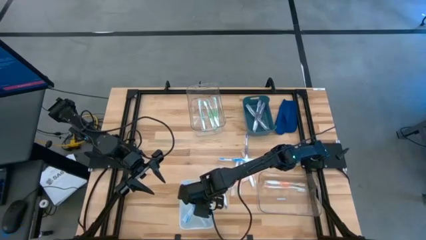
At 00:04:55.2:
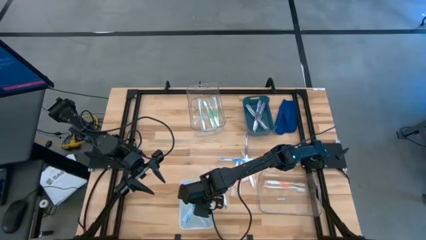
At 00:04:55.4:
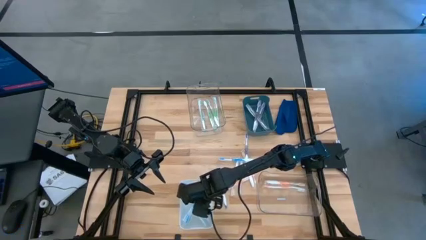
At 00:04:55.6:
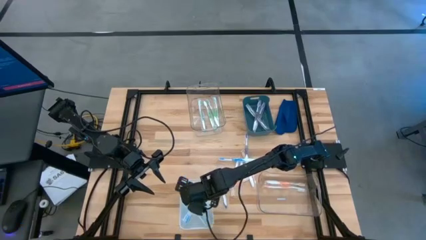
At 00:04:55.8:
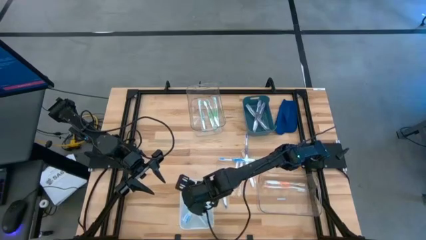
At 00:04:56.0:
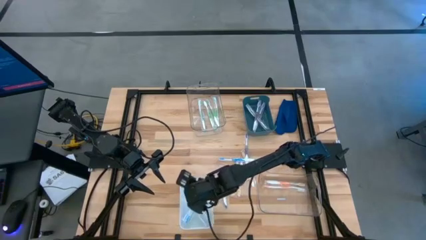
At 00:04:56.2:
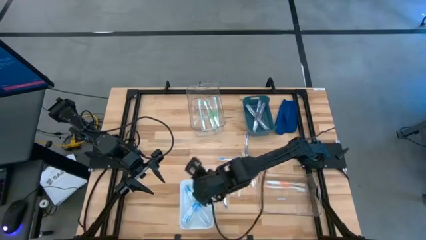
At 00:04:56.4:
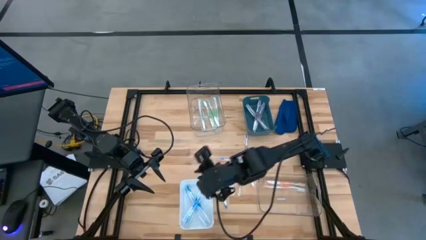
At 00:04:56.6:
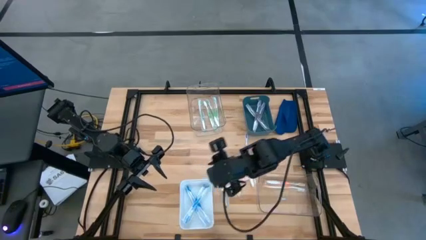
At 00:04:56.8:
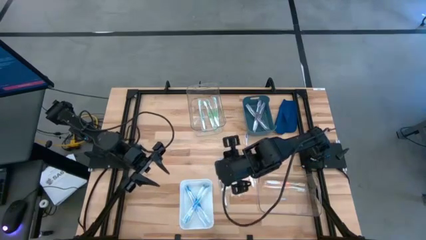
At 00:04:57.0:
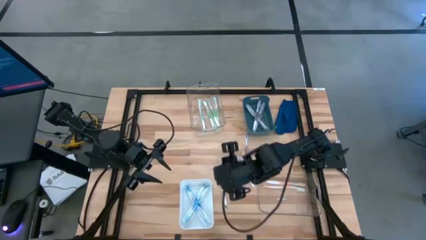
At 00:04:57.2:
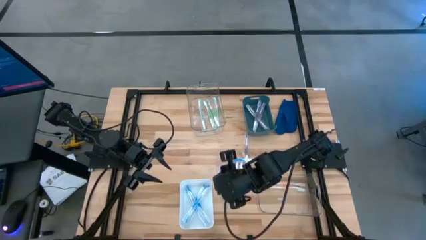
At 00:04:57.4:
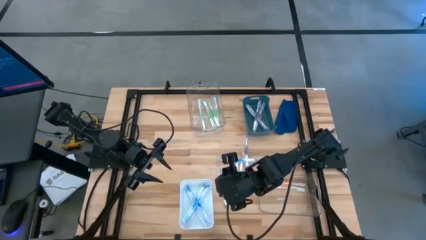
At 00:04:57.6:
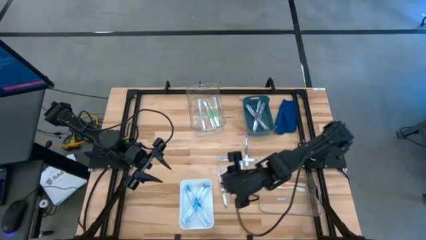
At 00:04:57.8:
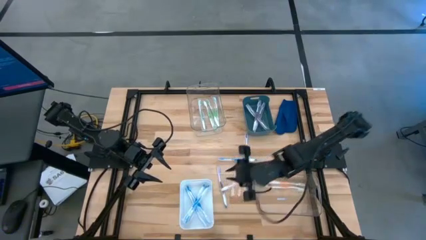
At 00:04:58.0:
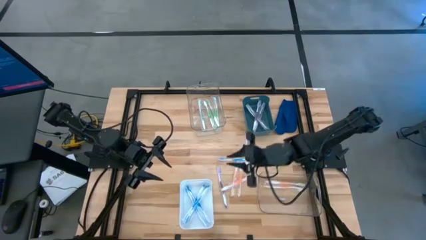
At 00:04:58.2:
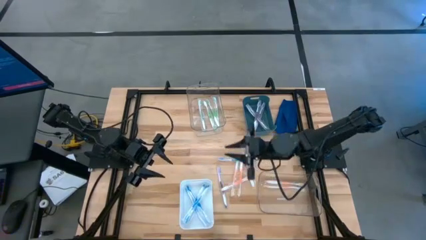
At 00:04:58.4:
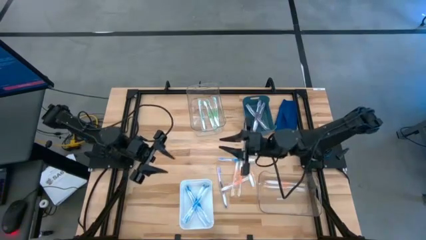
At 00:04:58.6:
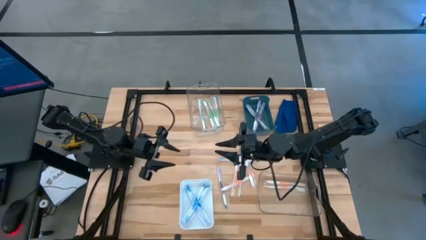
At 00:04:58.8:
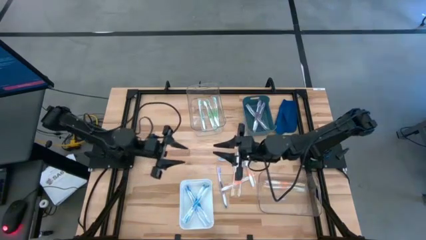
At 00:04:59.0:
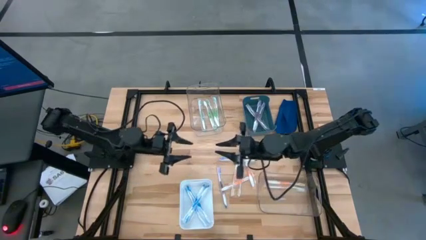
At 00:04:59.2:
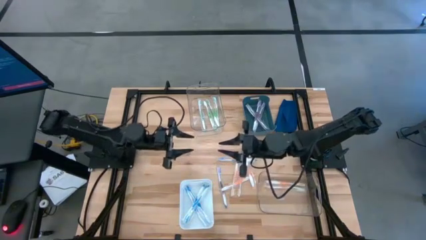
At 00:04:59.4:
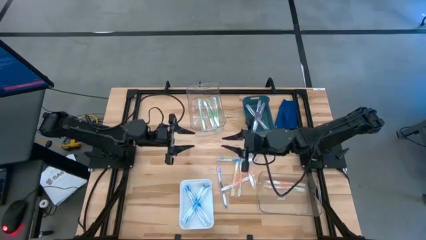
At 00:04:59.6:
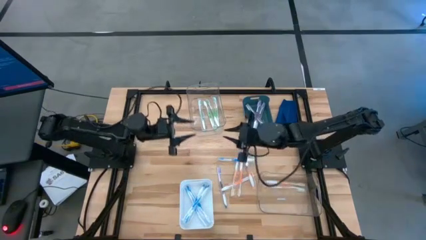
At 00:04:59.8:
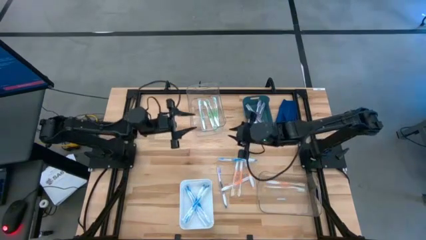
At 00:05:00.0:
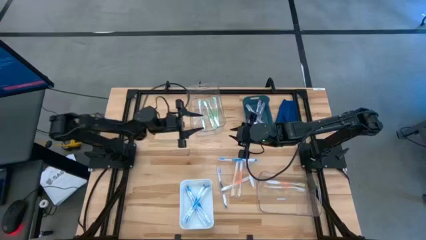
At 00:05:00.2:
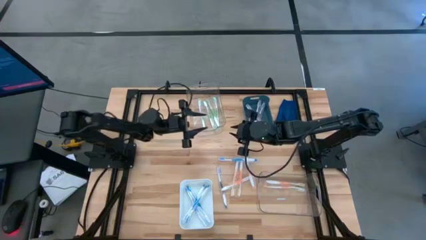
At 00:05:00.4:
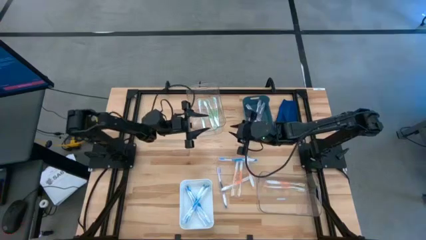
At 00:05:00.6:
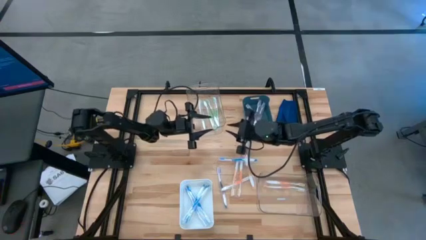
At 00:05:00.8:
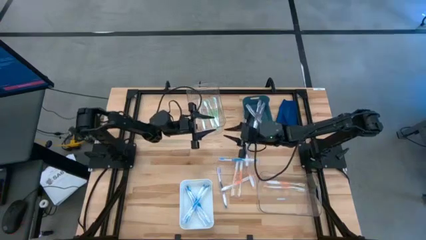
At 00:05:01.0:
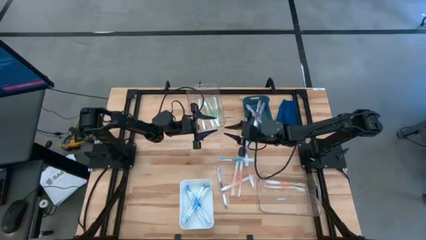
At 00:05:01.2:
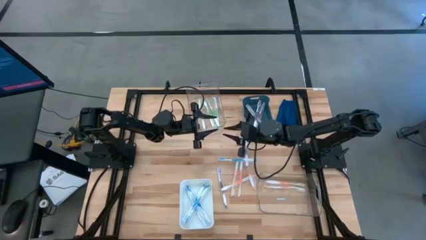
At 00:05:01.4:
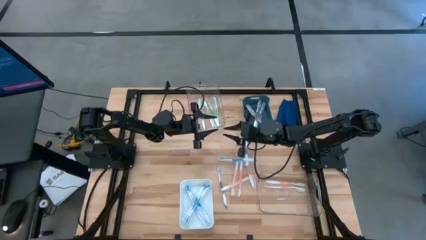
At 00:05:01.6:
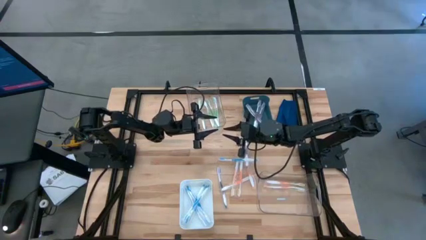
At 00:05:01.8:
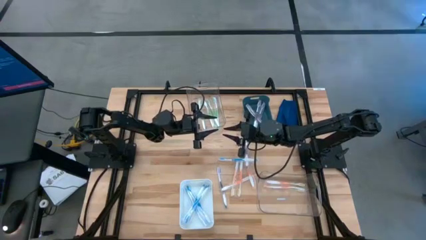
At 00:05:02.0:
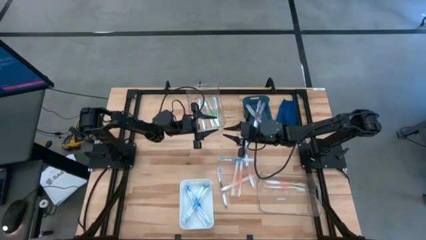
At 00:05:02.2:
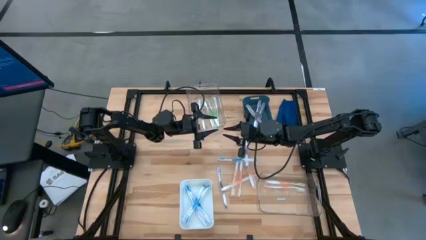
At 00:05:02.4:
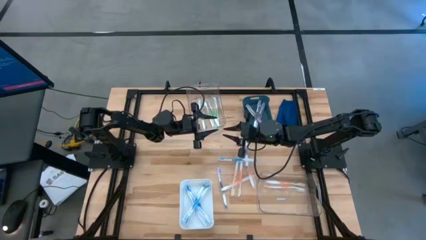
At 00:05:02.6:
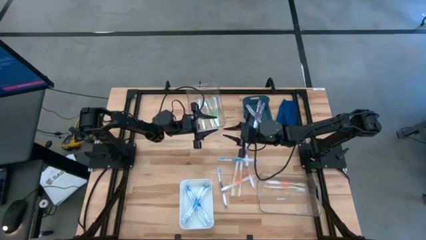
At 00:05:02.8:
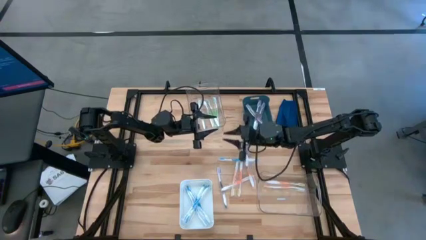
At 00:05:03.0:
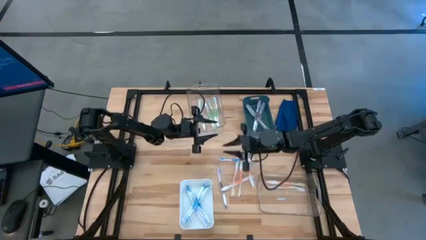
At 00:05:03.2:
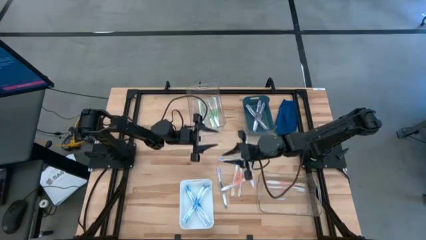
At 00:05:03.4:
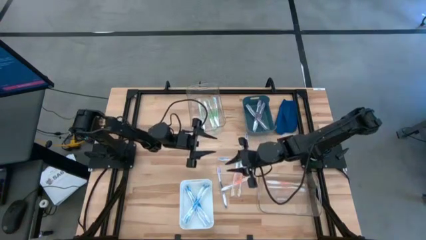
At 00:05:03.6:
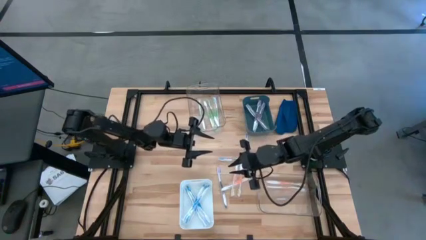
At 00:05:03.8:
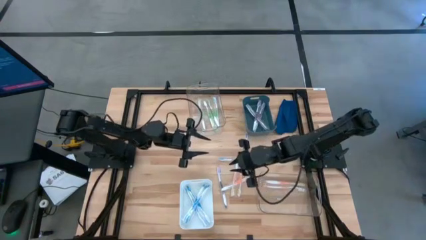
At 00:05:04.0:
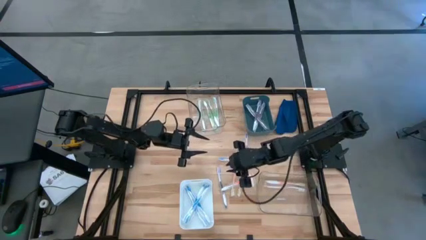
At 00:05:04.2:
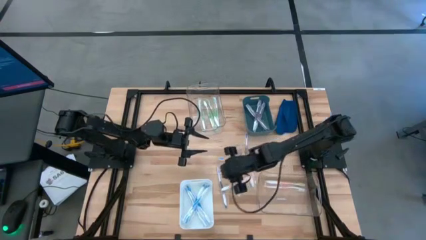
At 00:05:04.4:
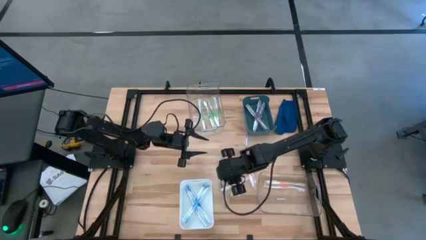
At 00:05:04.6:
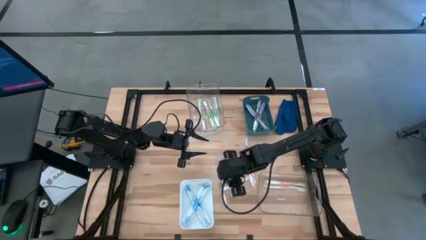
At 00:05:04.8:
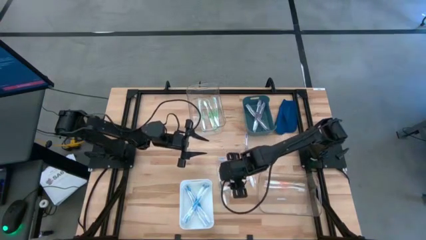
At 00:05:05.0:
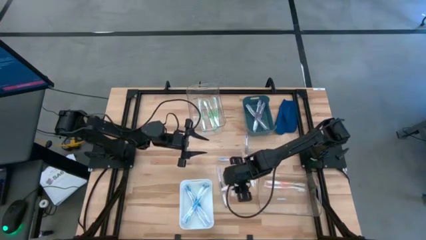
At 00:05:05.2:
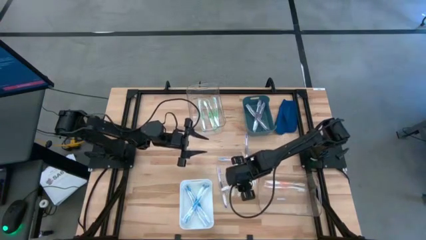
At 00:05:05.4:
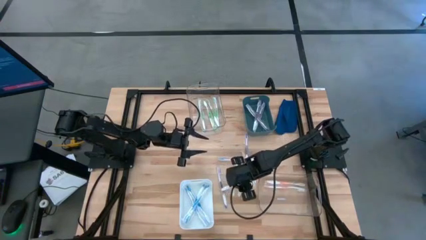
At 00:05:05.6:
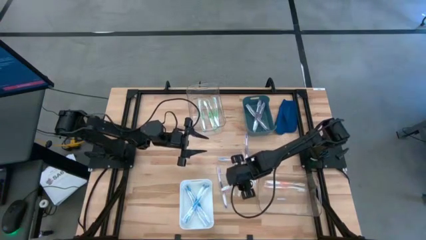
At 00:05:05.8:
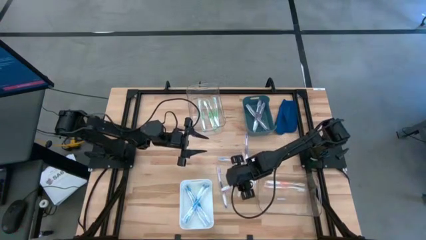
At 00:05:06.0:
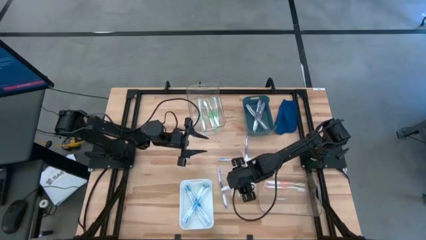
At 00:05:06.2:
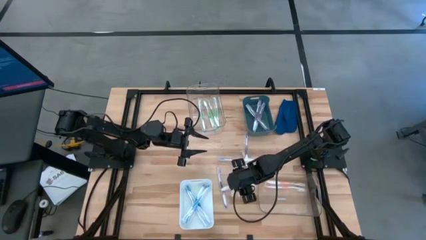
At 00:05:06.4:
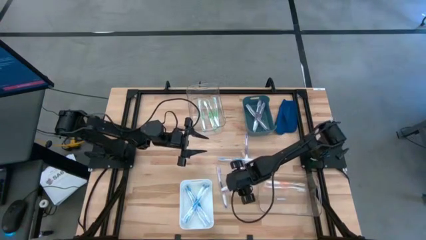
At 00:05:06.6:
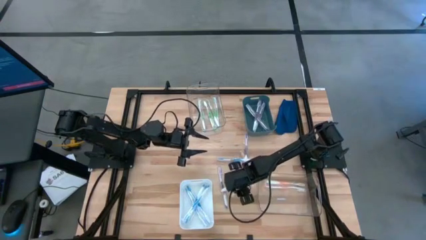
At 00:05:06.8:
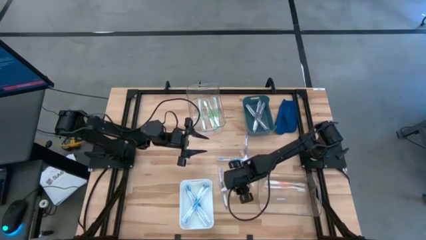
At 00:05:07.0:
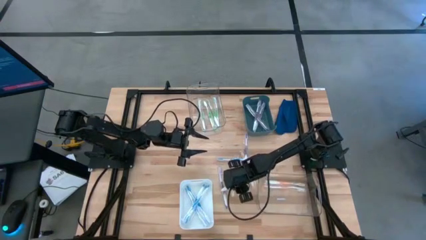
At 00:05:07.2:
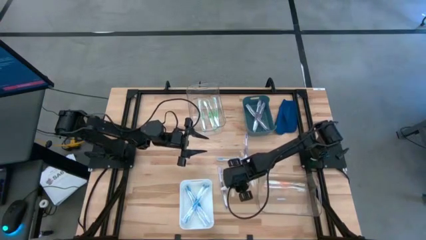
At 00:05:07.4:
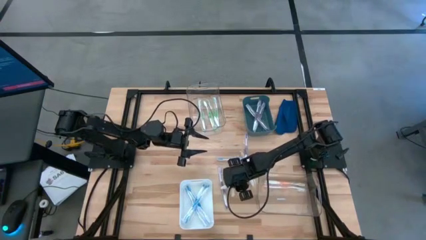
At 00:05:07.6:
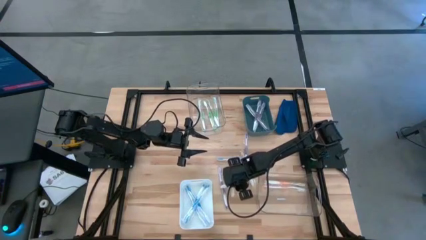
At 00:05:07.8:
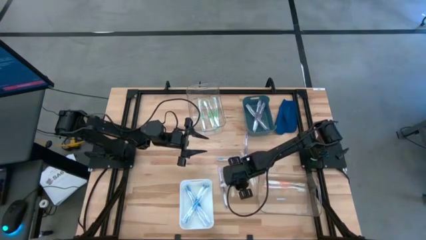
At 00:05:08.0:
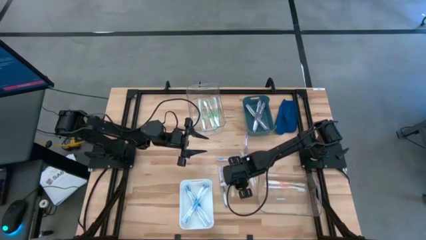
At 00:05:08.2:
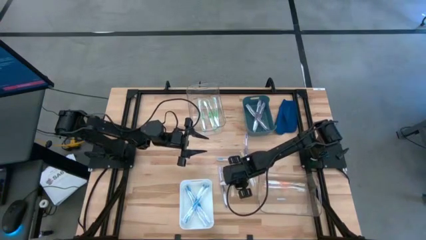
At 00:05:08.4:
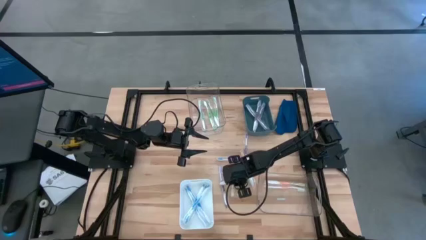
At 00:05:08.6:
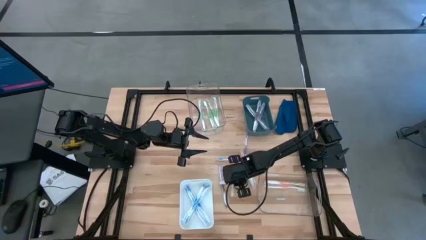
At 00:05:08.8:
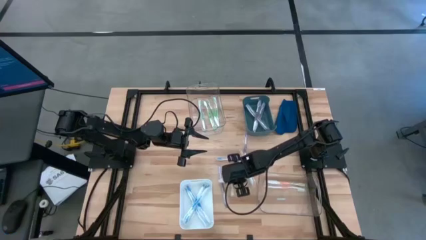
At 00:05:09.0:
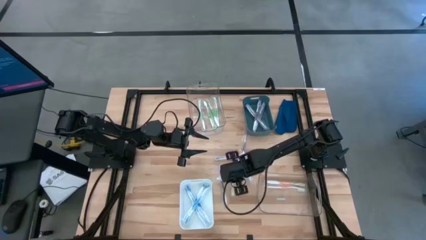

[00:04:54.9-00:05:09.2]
Task: Pick & Place Toothbrushes
Put the orange toothbrush into the bottom transparent bin
